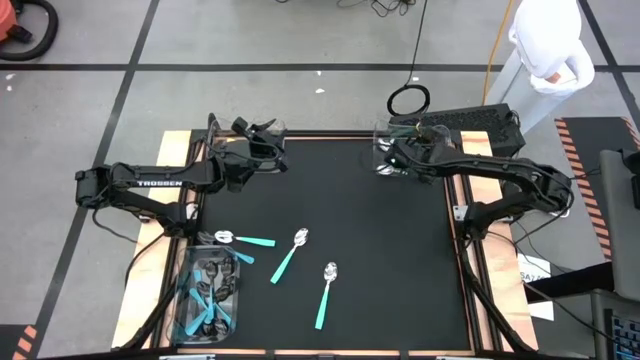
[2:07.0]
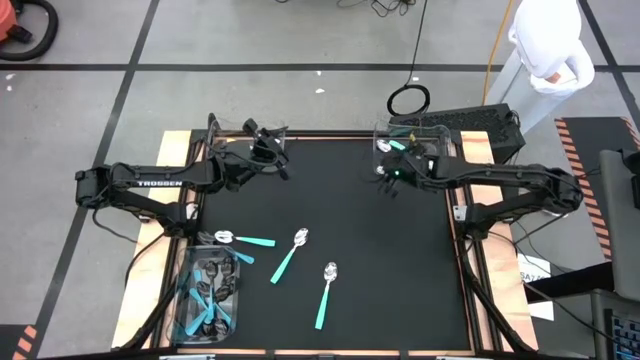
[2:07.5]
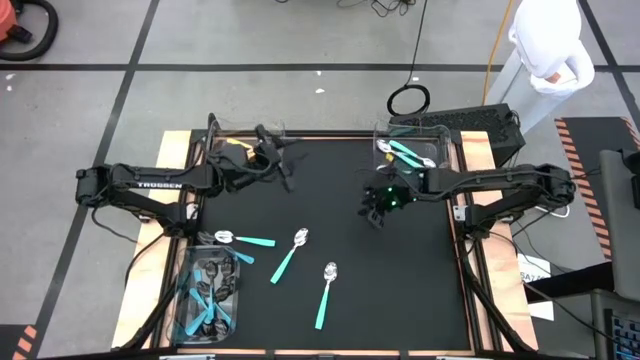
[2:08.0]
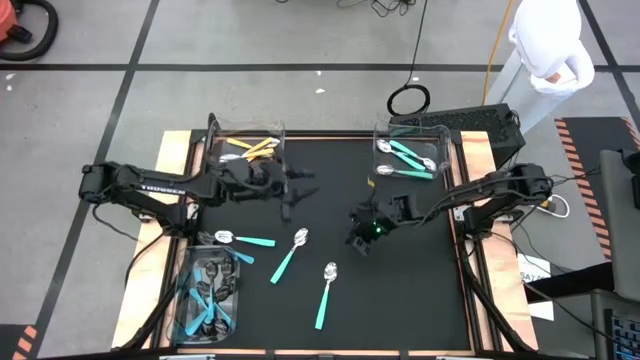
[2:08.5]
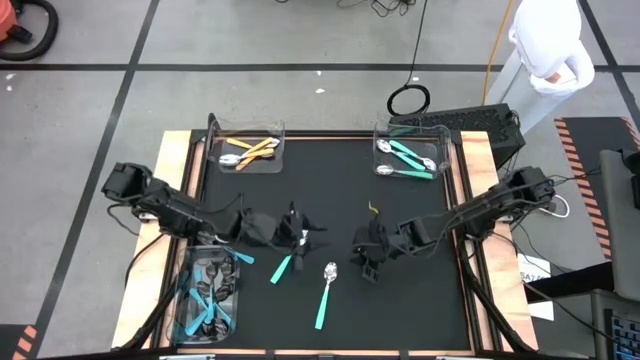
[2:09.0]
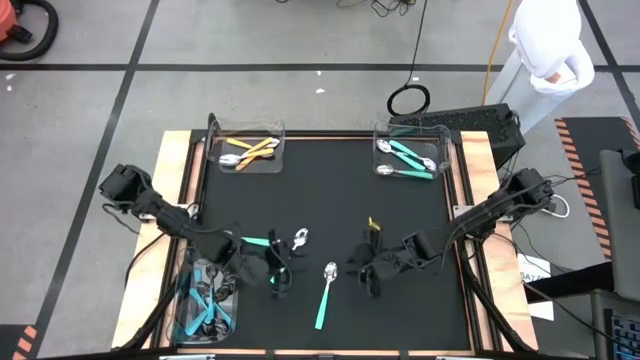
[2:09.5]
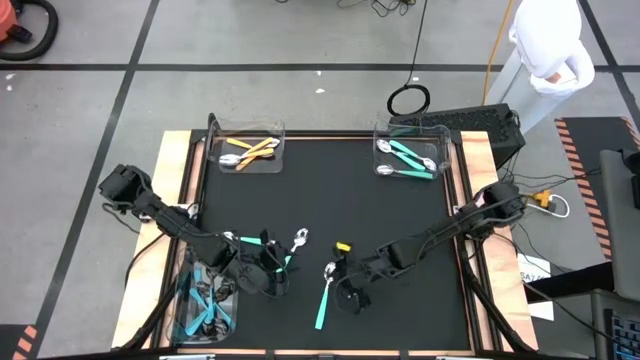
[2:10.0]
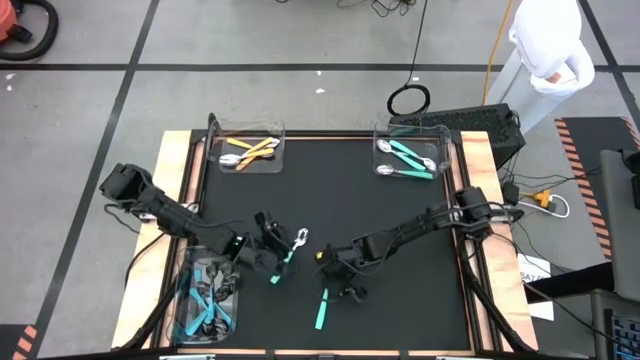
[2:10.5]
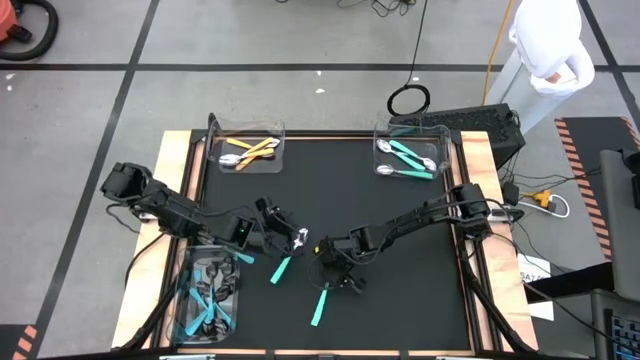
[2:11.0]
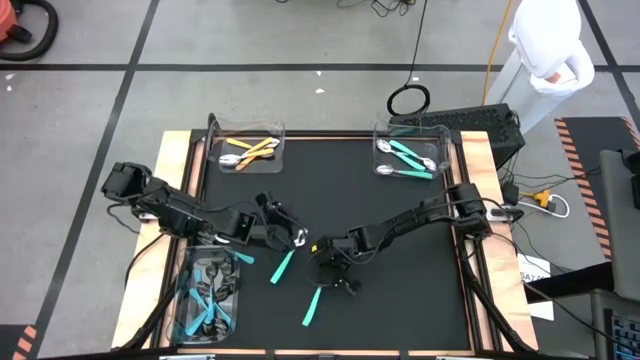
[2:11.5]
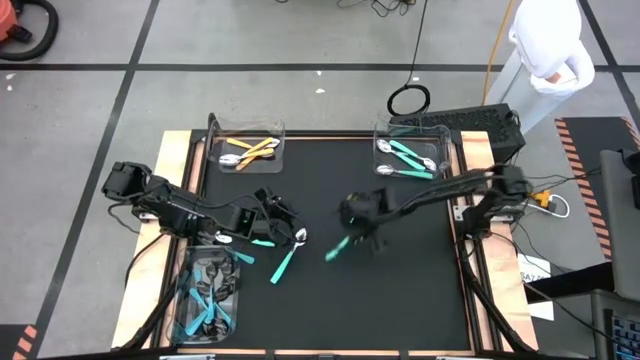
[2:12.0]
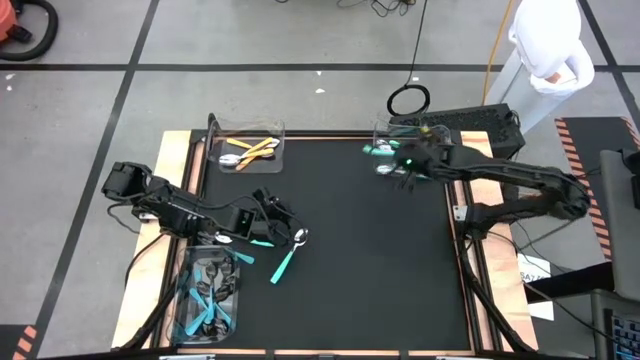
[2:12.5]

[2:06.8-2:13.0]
Task: Sort silverware by color (type)
Put the bottom green spoon into the top right bin

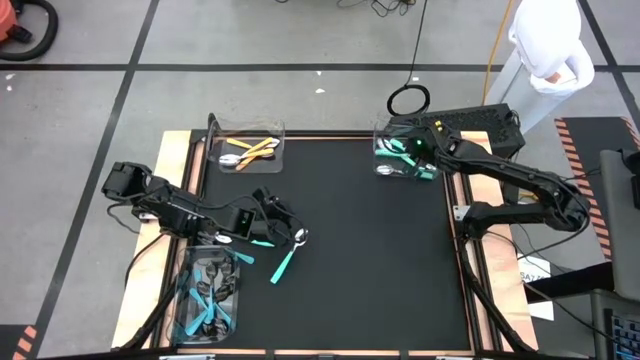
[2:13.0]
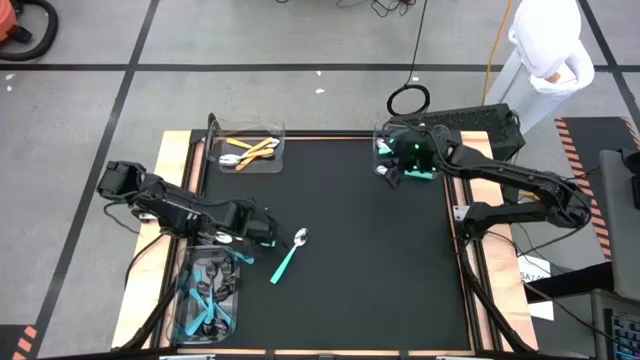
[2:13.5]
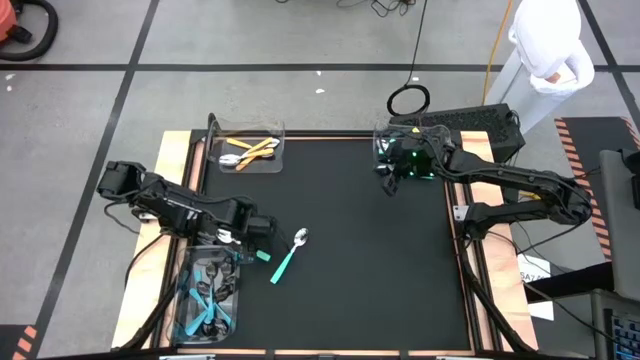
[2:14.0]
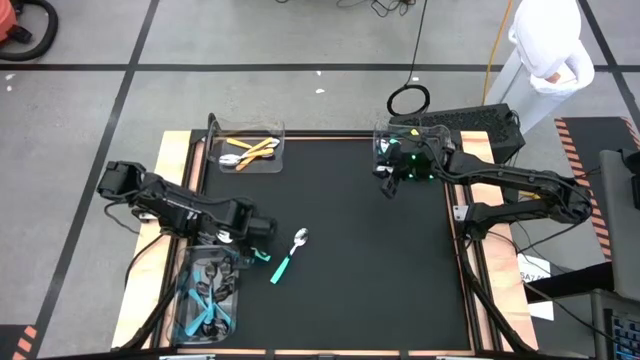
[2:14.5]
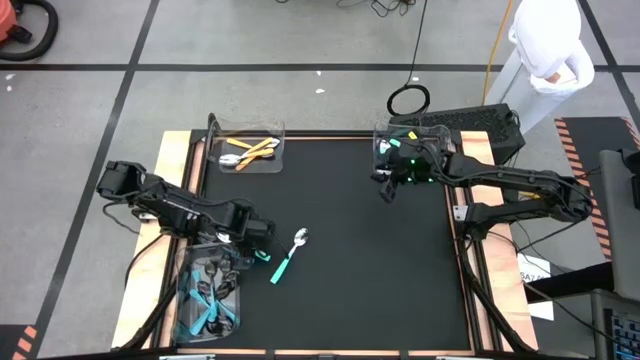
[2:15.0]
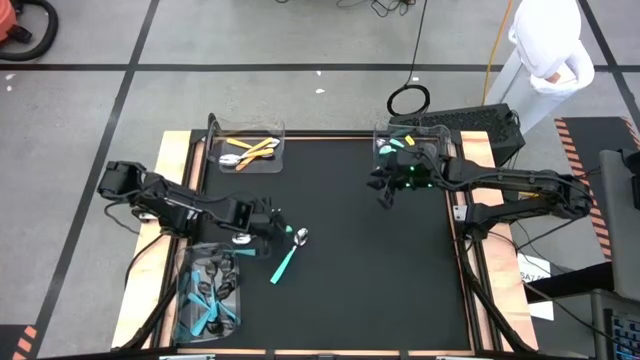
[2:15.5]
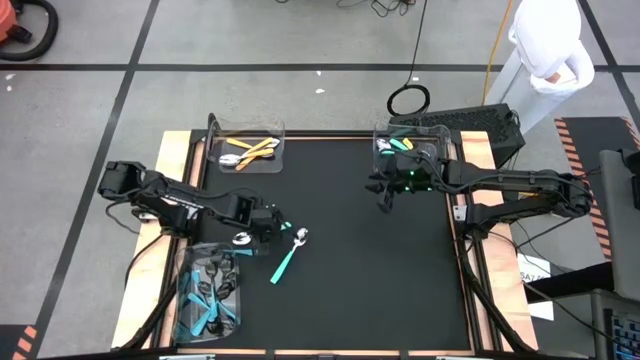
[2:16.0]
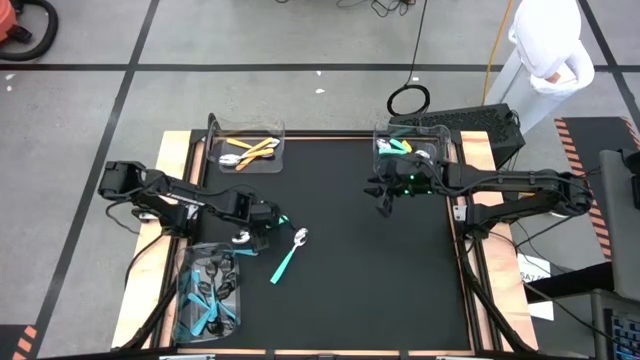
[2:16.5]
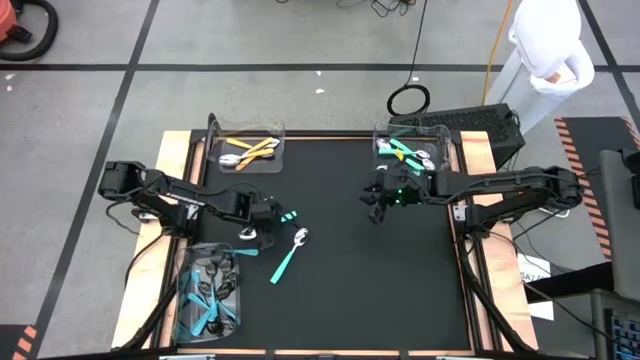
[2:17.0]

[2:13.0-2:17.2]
Put the left green spoon into the top right bin

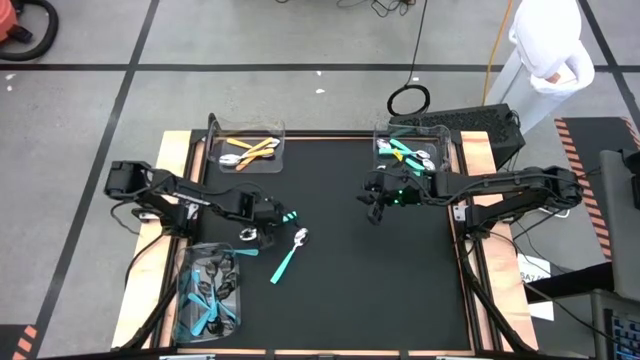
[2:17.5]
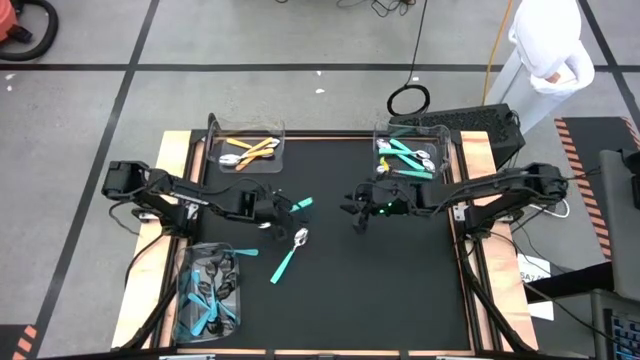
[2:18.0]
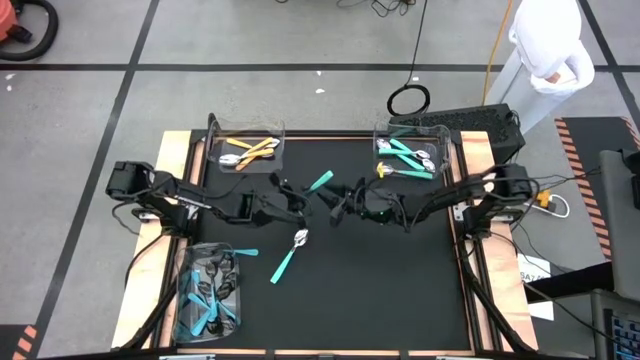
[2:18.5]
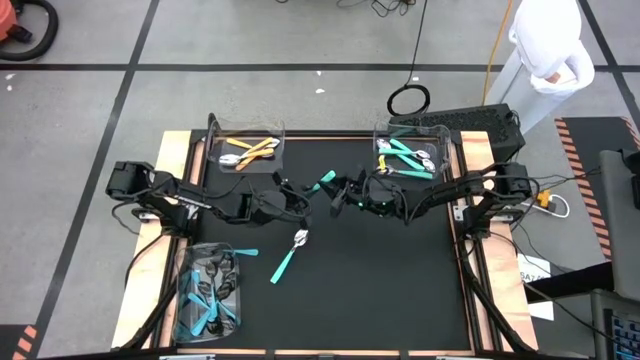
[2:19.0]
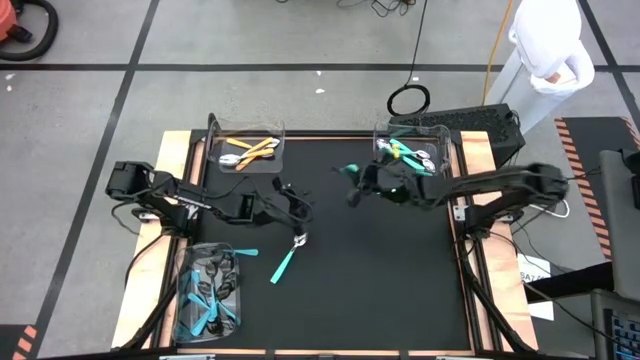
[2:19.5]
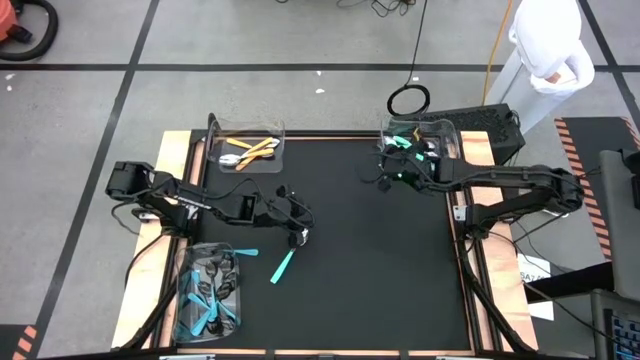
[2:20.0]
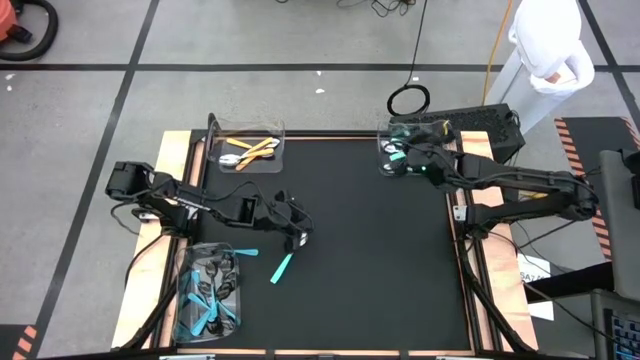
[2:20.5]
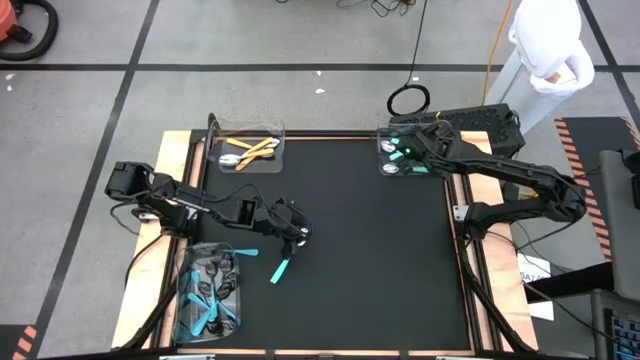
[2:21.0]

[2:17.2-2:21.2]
Put the left green spoon into the top right bin

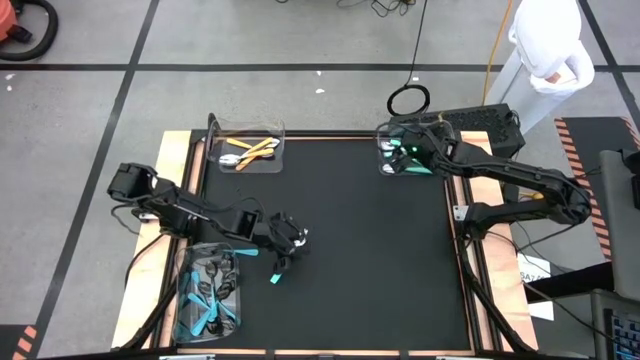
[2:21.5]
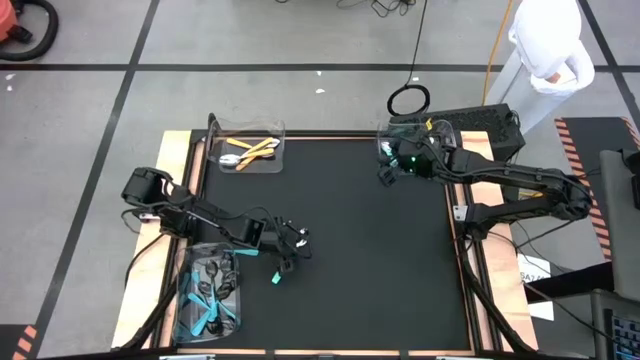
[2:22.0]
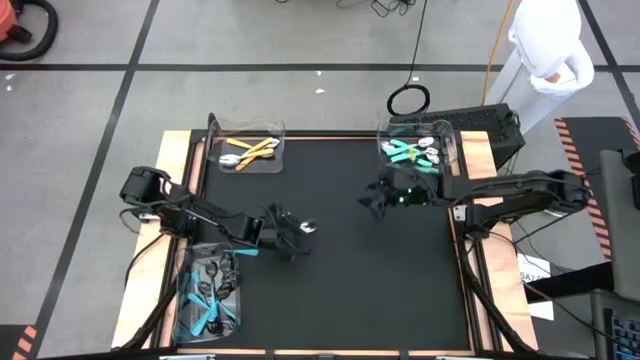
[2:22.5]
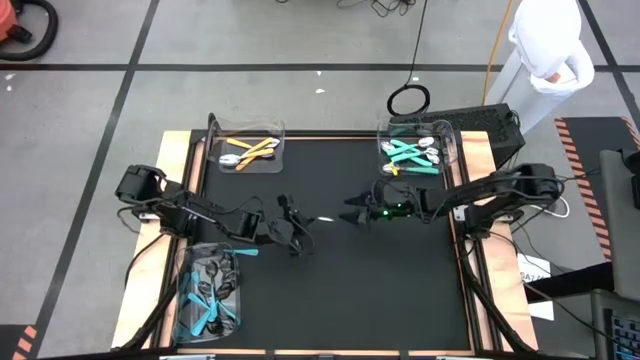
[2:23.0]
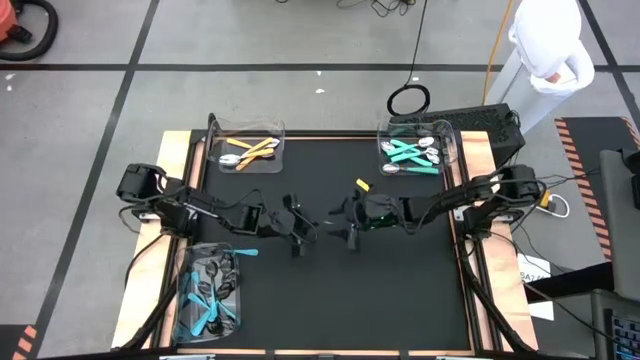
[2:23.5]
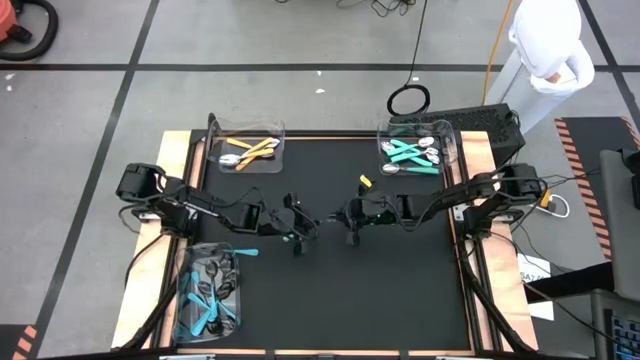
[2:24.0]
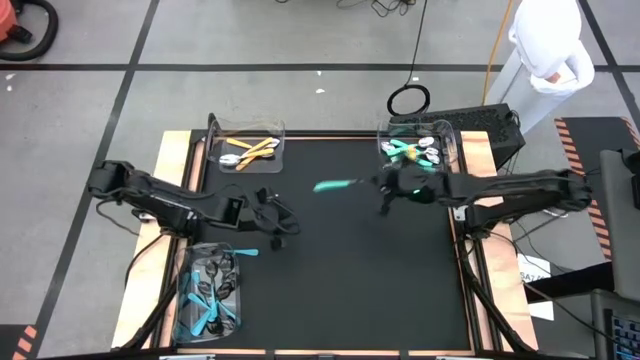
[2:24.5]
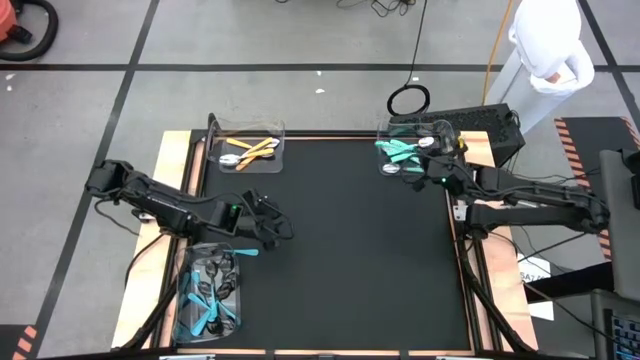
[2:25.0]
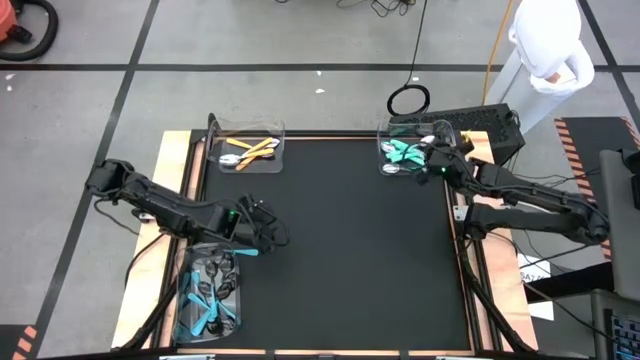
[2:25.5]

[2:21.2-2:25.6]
Put the green spoon into the top right bin

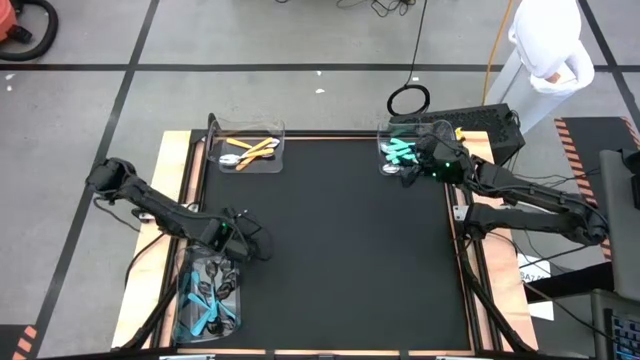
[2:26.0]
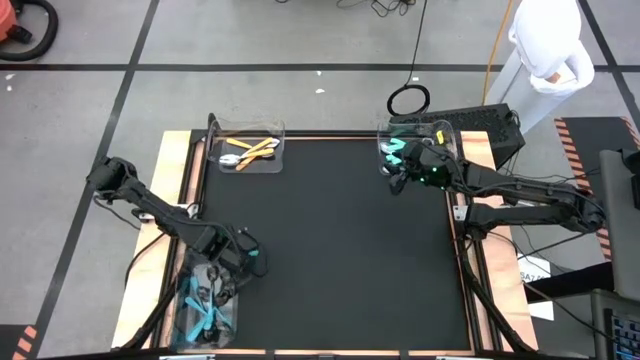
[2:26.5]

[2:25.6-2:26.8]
Adjust the bottom bin on the table

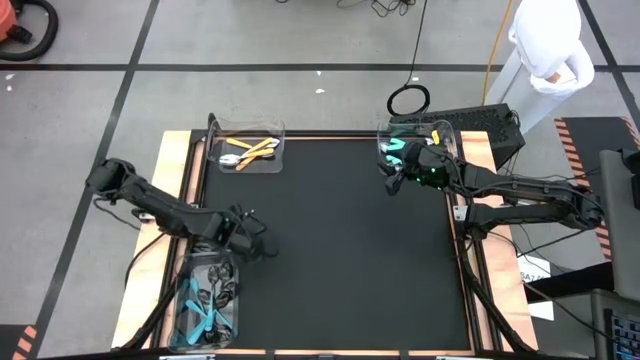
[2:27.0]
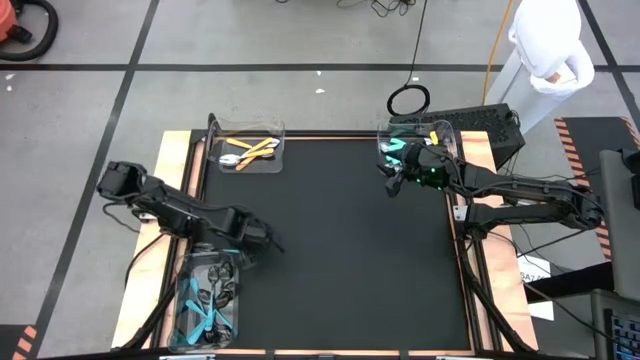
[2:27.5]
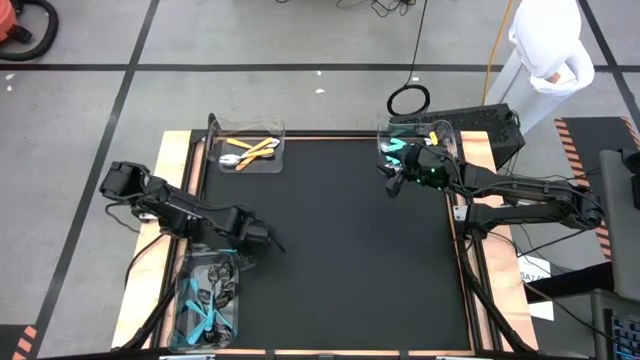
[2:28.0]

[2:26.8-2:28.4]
Put the blue spoon into the bottom bin

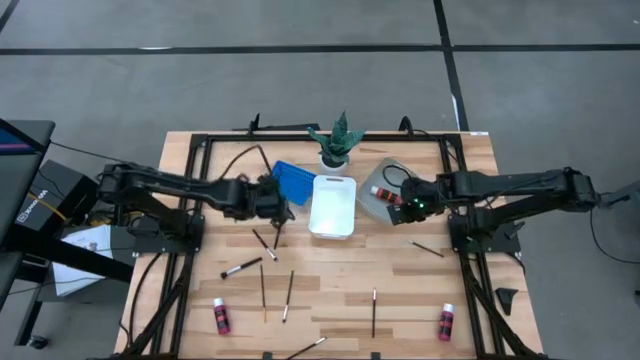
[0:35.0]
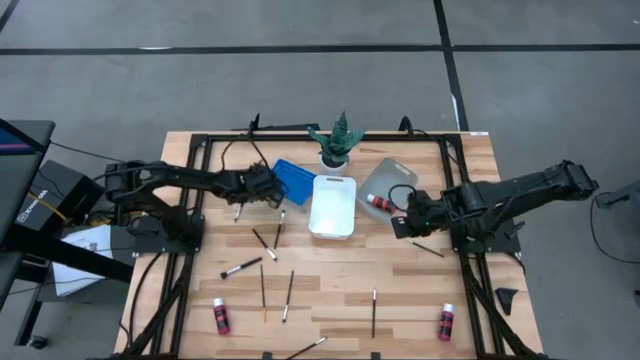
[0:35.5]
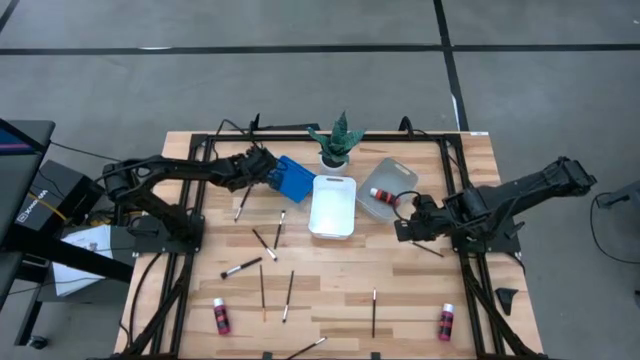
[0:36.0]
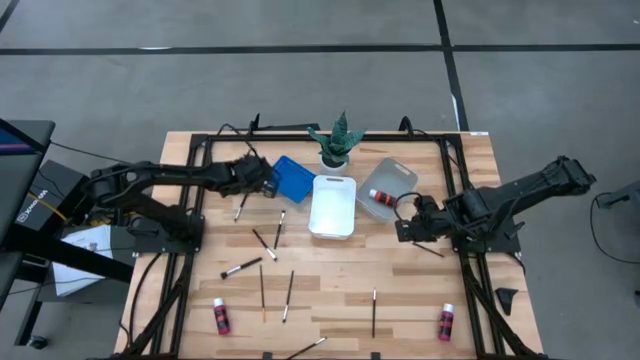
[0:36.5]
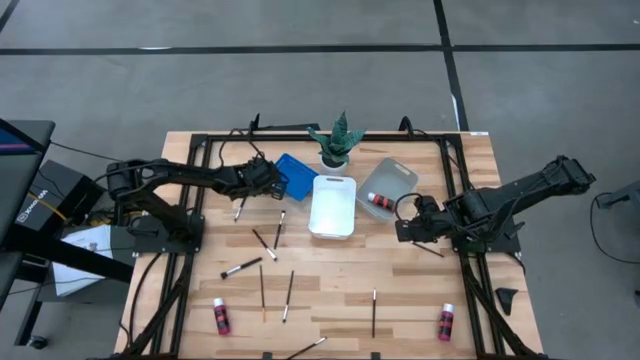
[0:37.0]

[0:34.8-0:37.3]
Task: Pick & Place Paint Supplies
Adjust the blue bin
